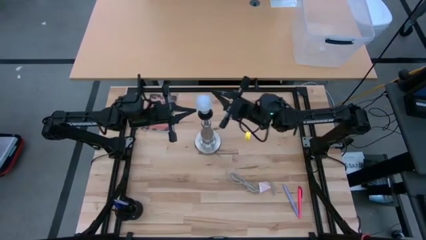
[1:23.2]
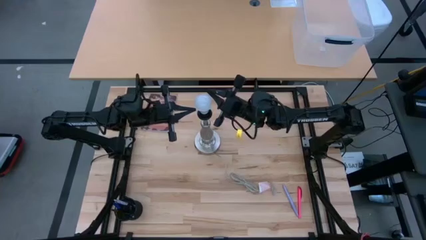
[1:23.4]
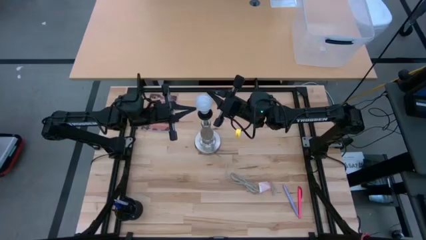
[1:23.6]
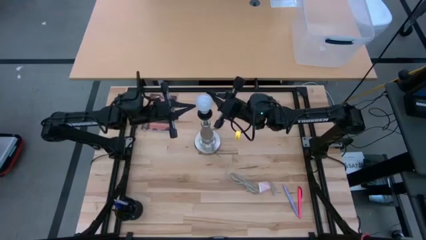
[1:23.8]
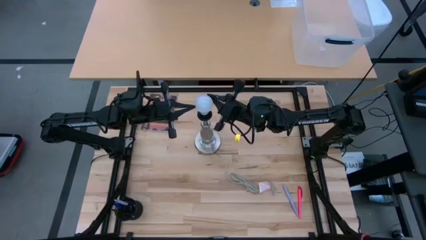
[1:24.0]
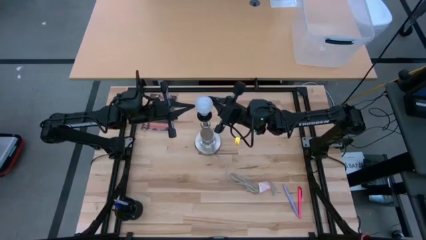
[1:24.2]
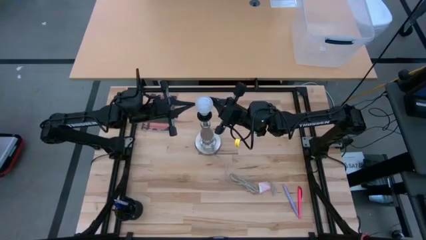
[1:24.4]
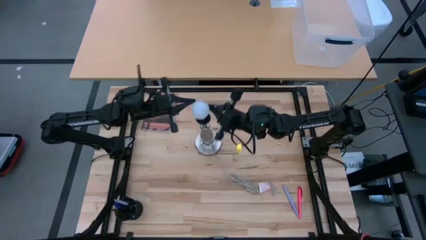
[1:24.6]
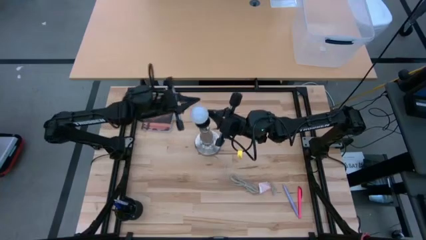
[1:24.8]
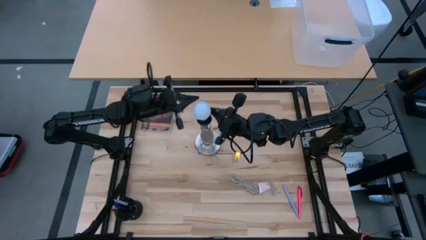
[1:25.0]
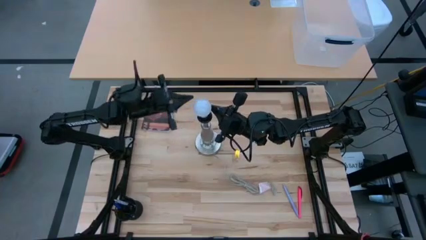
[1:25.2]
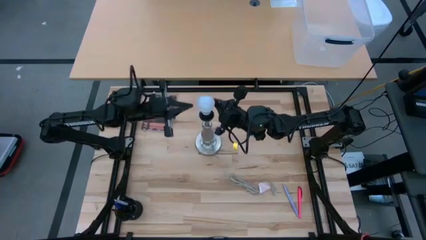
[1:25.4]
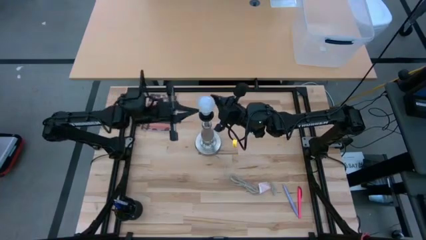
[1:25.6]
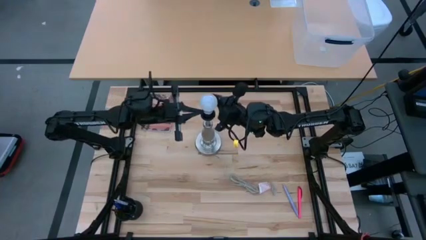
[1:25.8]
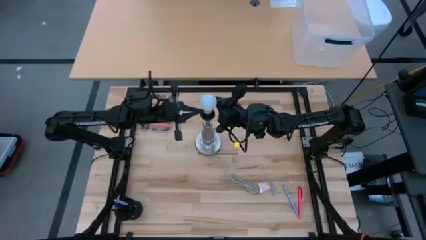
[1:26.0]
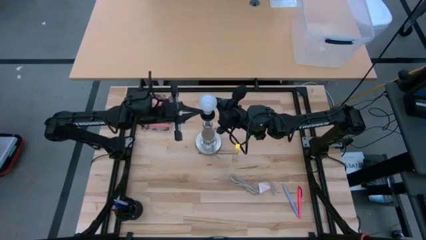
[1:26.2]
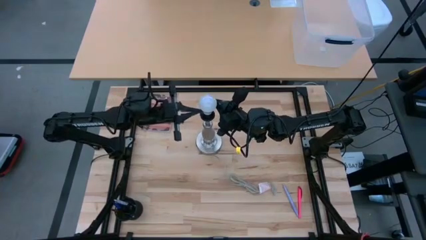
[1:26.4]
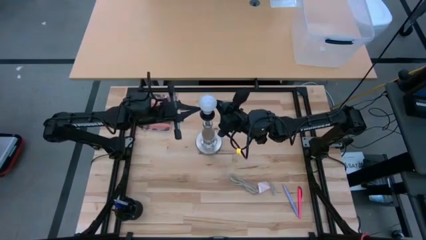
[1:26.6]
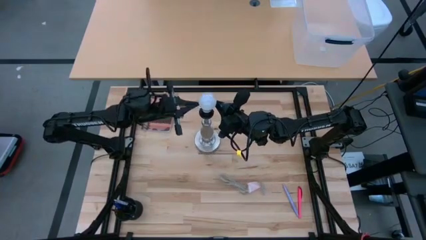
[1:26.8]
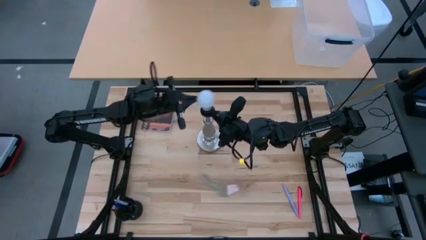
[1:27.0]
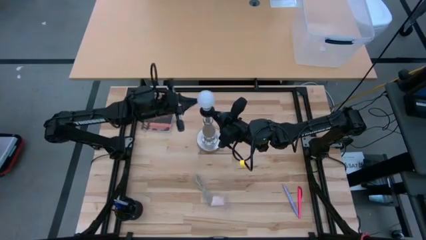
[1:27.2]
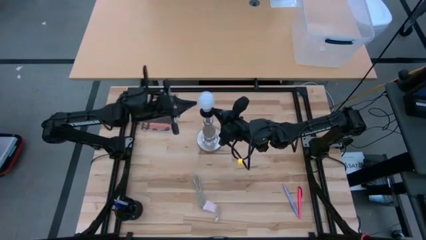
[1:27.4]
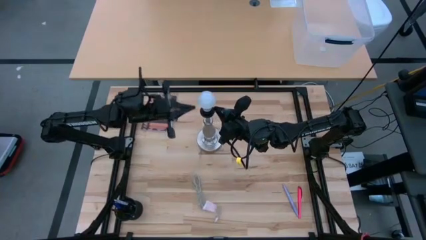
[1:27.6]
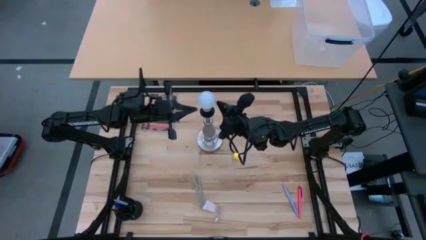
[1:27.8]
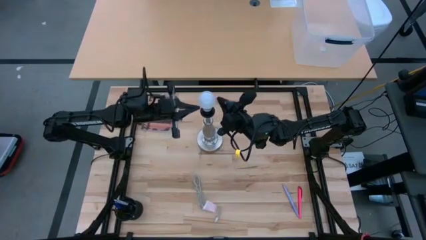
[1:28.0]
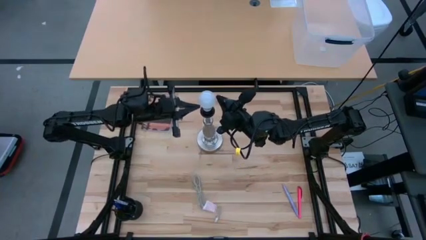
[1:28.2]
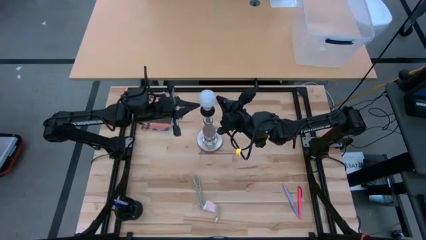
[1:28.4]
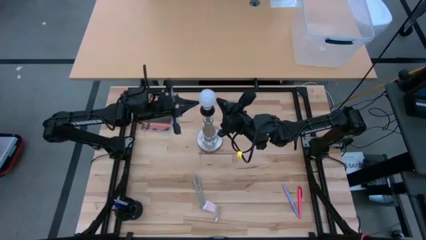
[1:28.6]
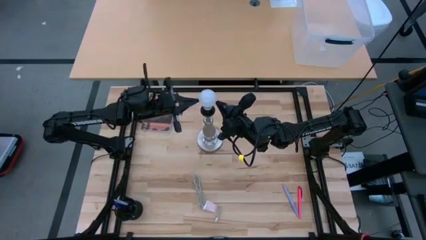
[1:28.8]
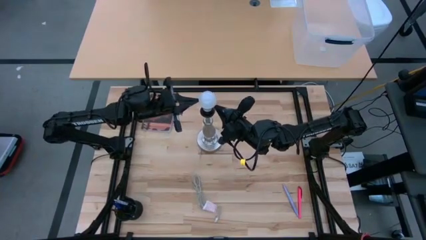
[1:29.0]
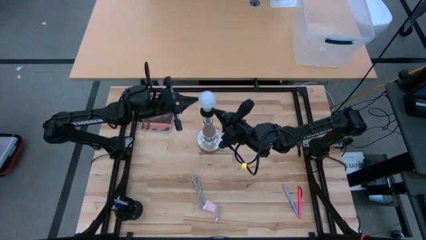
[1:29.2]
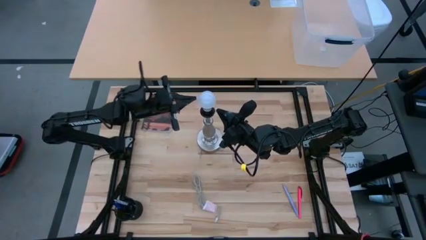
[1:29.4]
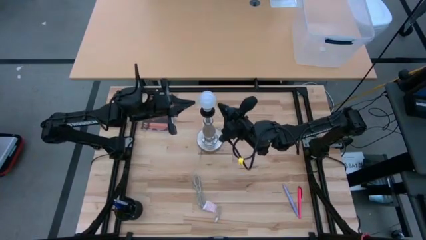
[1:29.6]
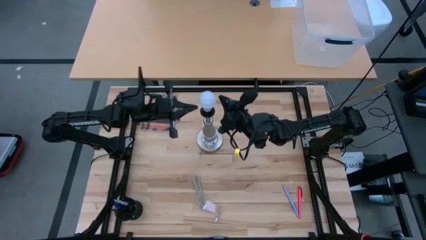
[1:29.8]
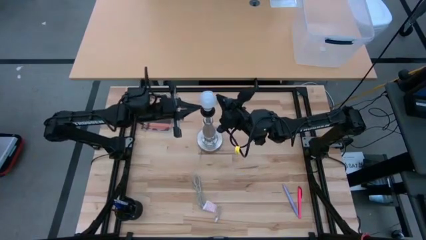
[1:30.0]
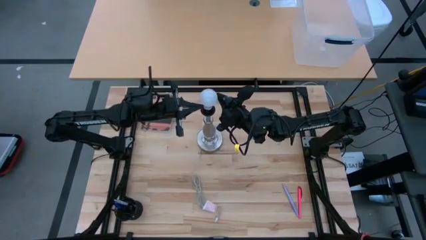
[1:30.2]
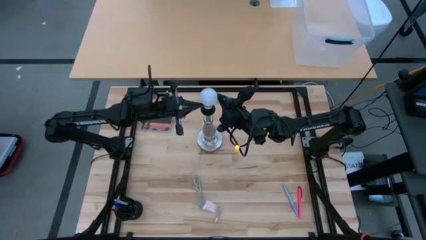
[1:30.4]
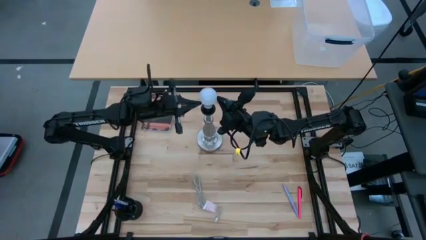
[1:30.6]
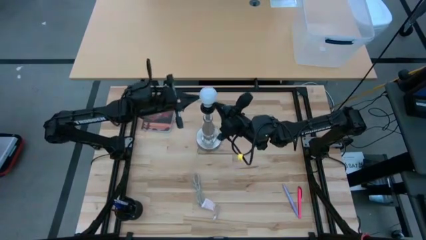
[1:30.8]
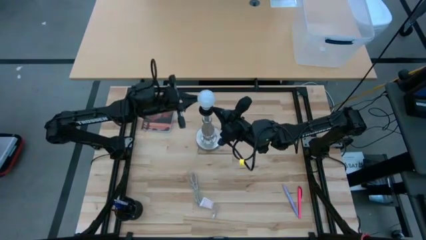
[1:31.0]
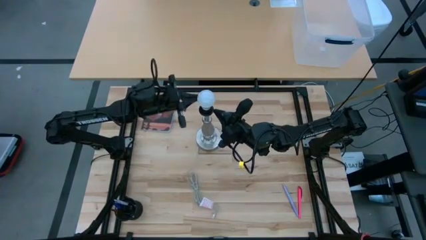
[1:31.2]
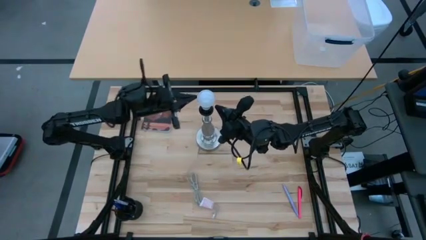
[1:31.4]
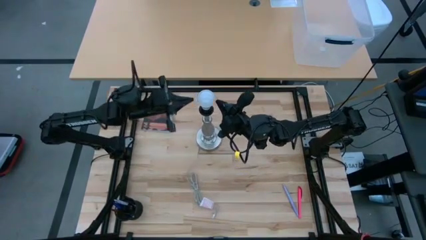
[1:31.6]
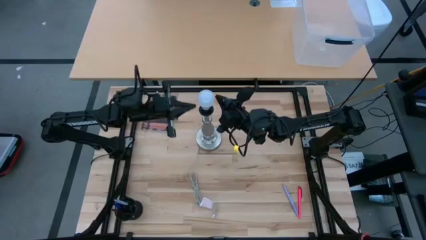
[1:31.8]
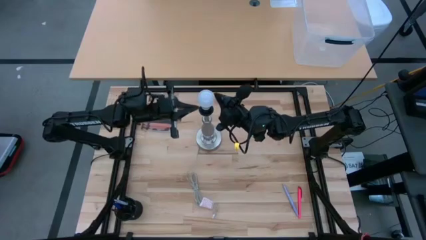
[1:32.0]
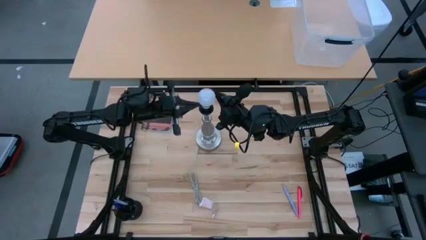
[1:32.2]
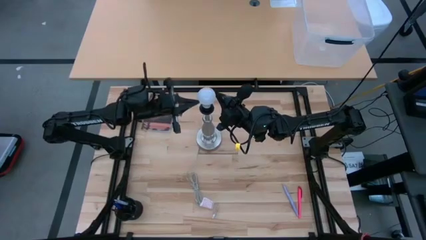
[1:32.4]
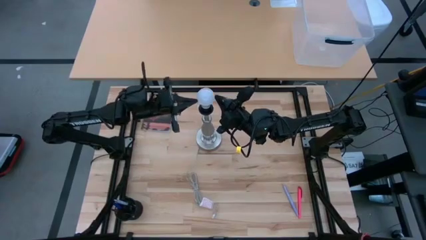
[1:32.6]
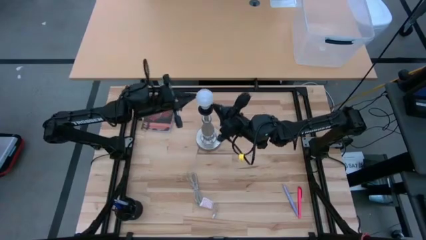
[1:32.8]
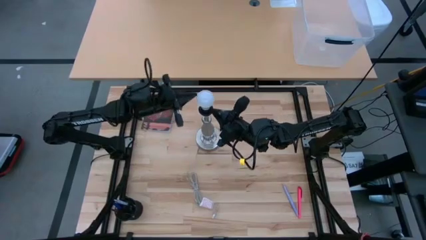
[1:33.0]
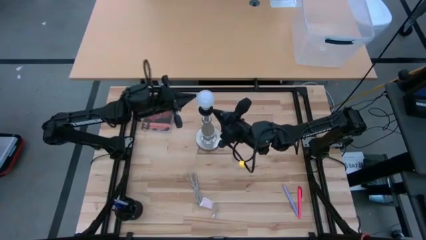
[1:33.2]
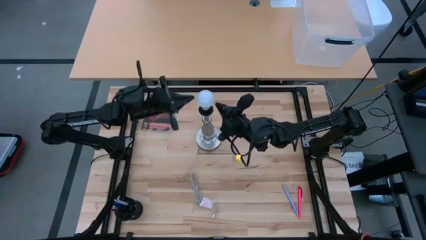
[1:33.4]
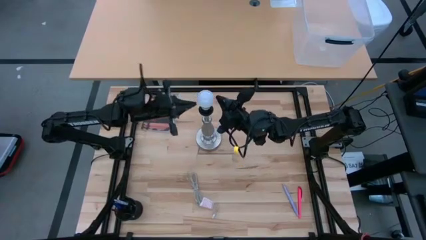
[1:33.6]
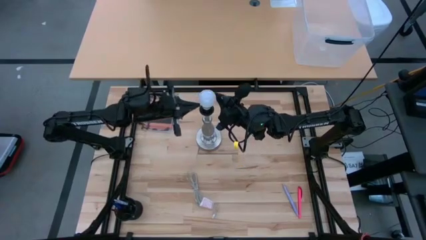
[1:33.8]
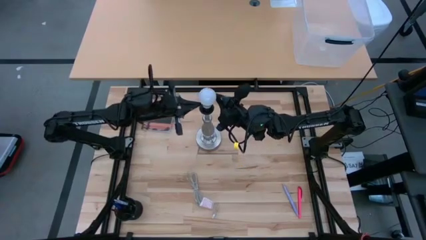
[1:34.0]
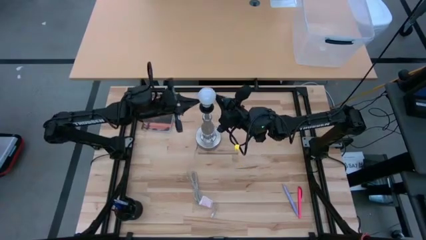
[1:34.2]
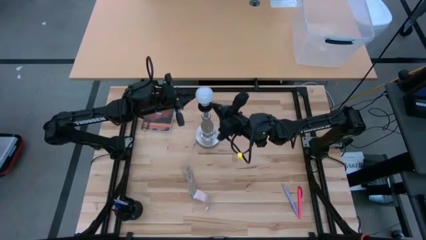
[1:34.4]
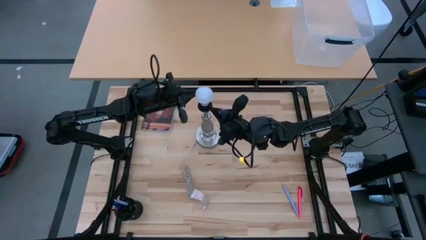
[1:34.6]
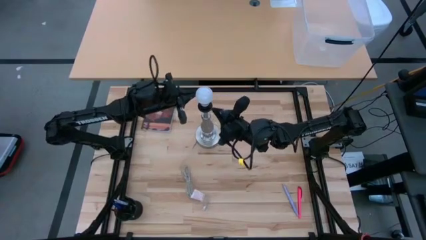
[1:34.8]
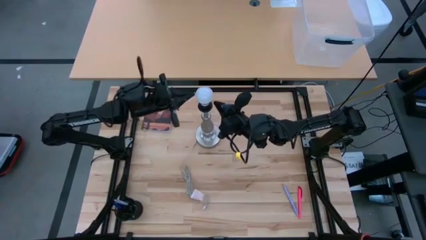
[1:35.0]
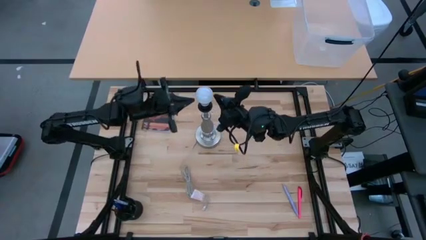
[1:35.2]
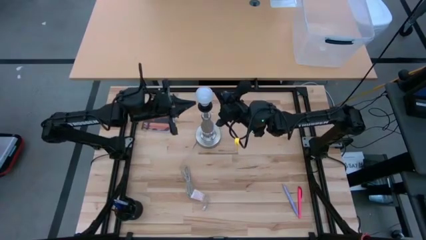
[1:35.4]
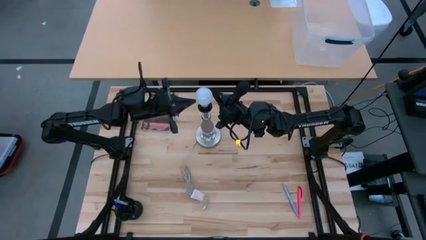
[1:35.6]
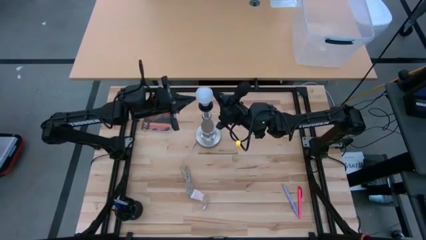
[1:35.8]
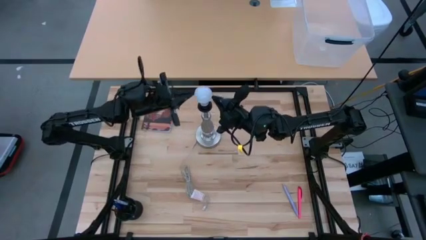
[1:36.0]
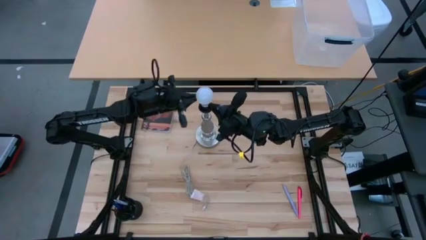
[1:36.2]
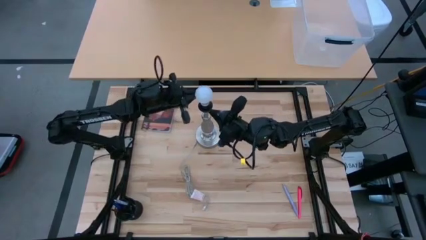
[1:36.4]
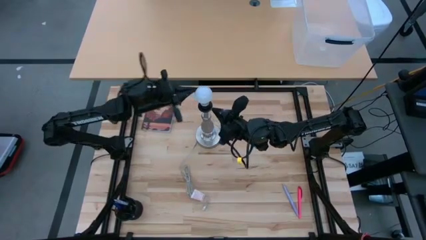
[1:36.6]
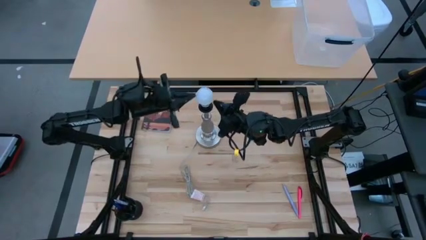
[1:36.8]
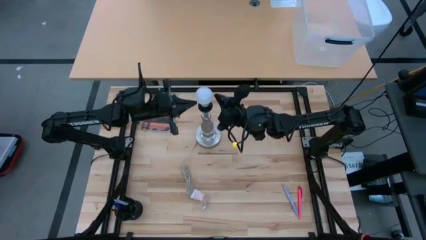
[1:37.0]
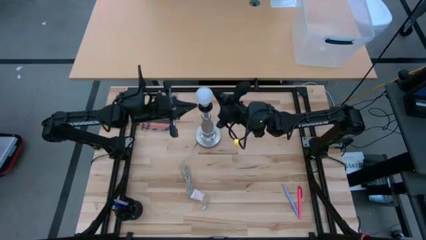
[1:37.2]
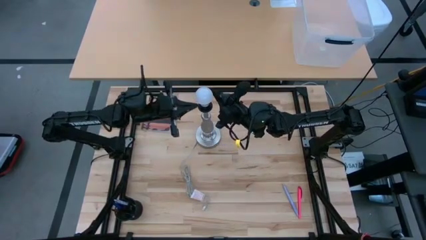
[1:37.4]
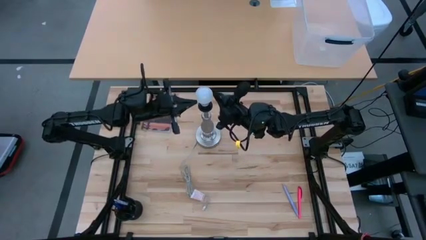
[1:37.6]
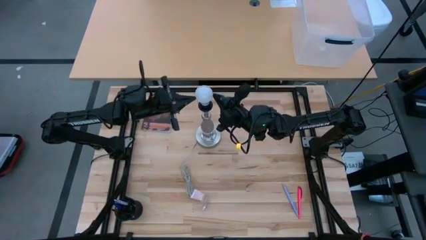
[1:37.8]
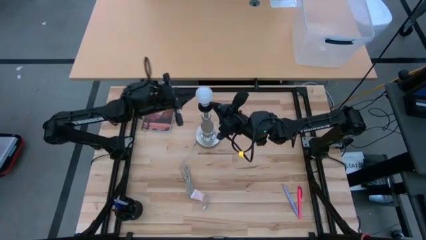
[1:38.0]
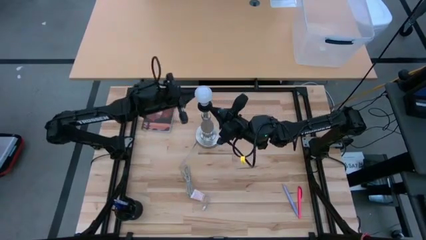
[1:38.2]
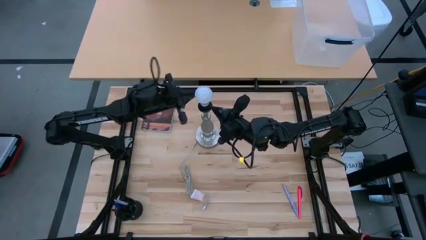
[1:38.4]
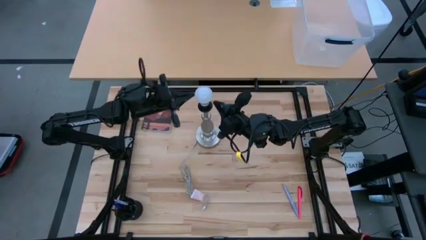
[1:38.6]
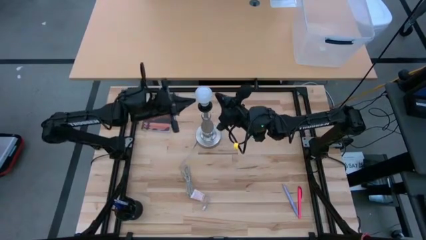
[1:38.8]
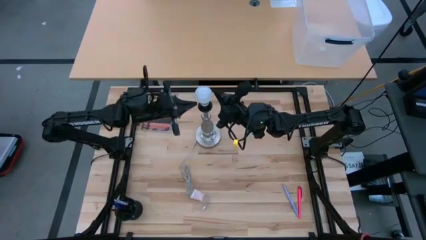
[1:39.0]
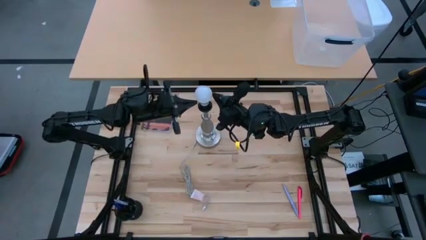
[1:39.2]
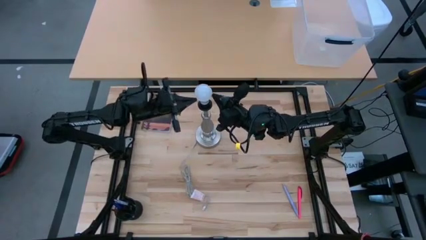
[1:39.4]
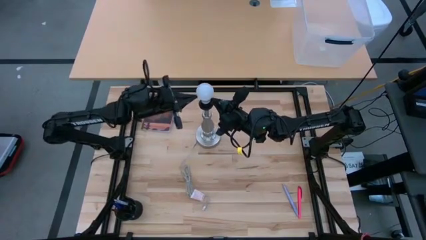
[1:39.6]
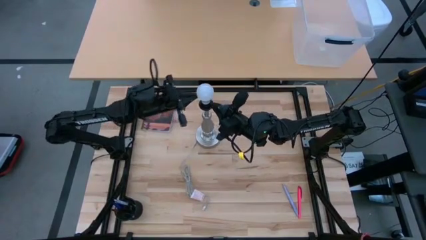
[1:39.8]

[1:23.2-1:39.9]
Task: Screw lightbulb
Insert the lightbulb into the silver lamp
